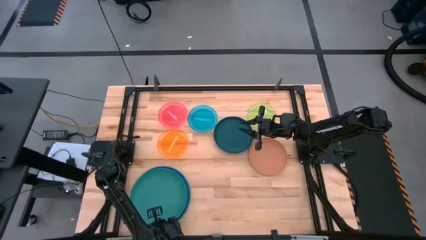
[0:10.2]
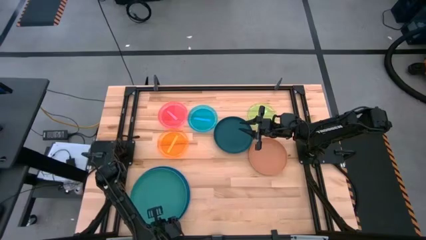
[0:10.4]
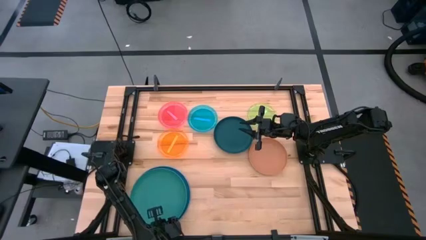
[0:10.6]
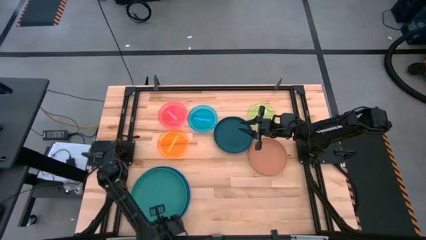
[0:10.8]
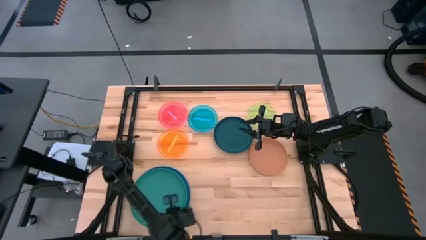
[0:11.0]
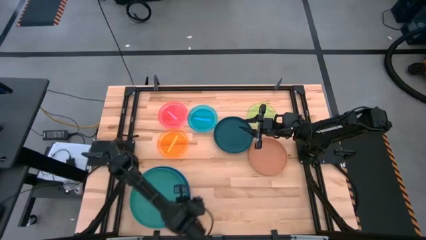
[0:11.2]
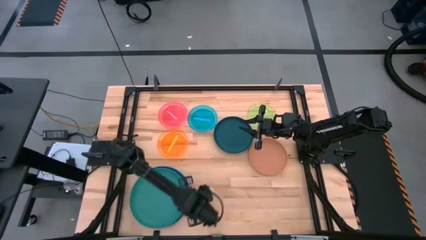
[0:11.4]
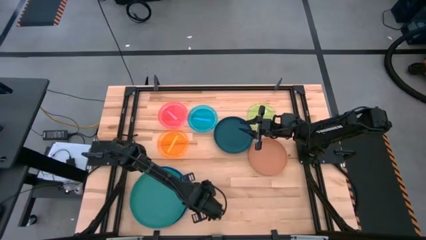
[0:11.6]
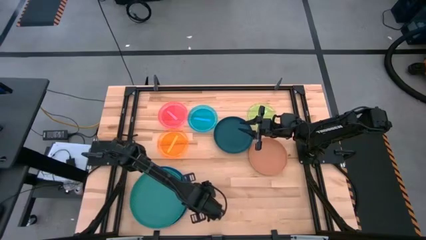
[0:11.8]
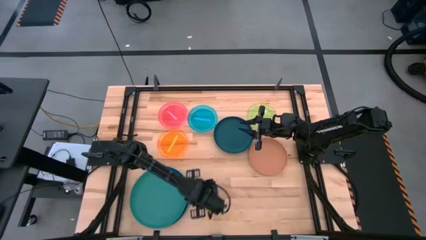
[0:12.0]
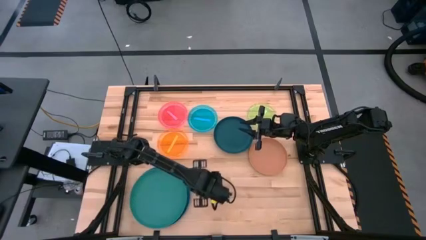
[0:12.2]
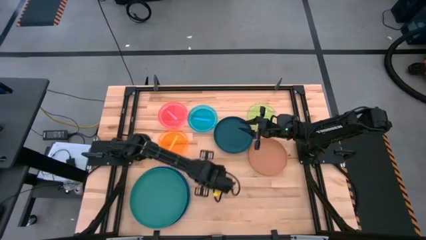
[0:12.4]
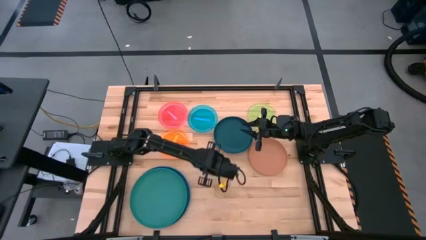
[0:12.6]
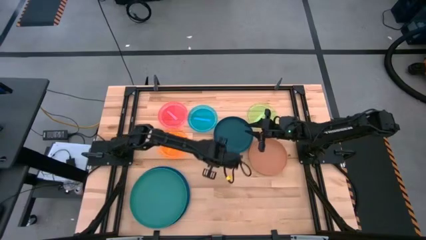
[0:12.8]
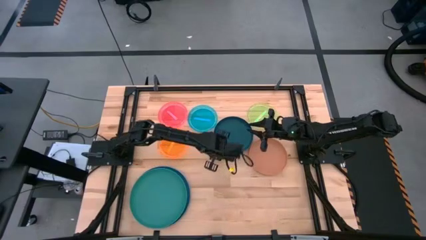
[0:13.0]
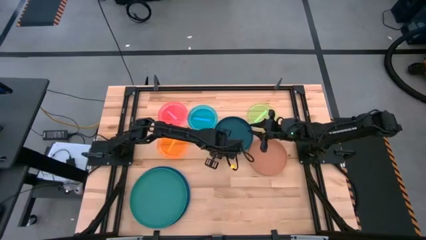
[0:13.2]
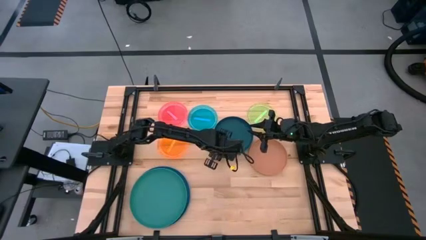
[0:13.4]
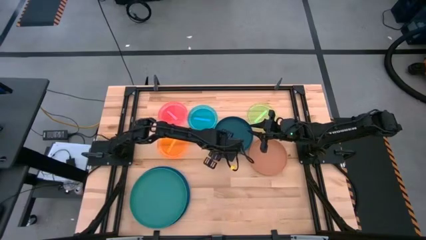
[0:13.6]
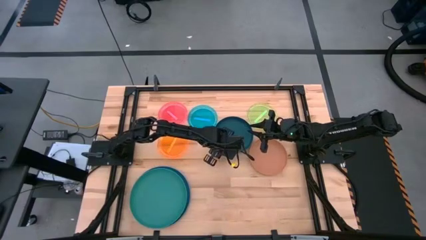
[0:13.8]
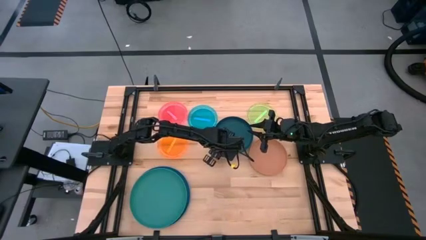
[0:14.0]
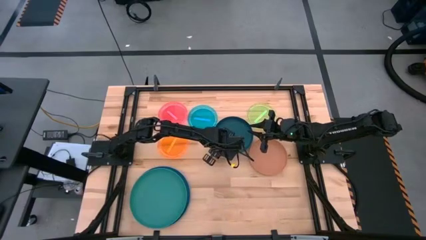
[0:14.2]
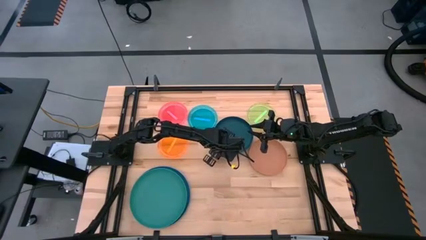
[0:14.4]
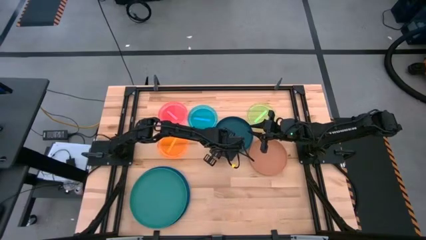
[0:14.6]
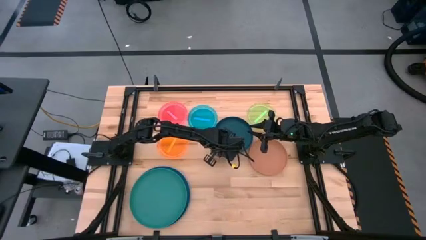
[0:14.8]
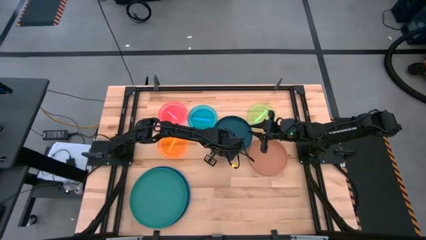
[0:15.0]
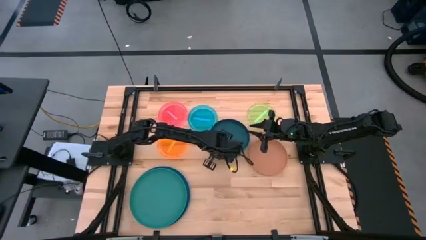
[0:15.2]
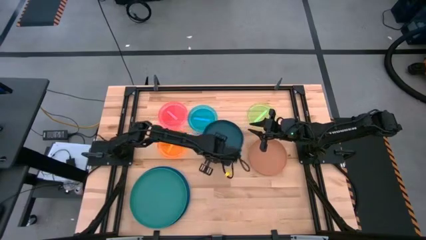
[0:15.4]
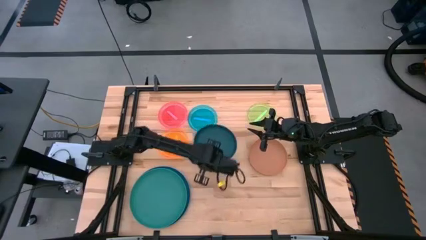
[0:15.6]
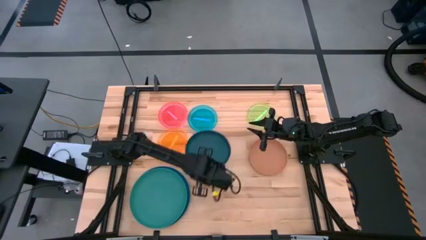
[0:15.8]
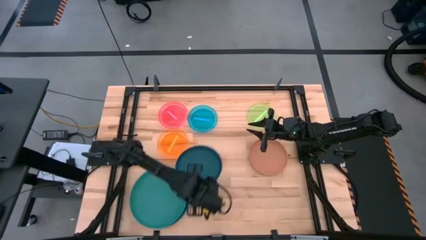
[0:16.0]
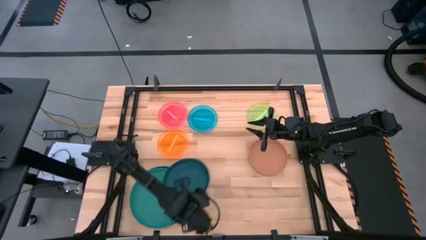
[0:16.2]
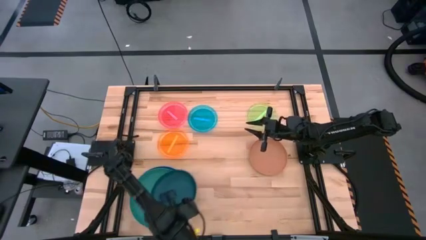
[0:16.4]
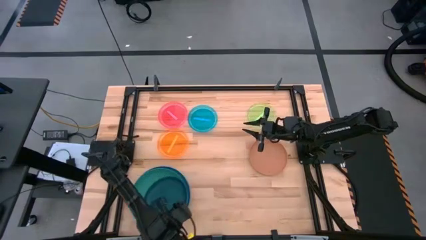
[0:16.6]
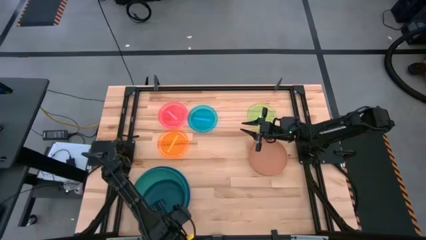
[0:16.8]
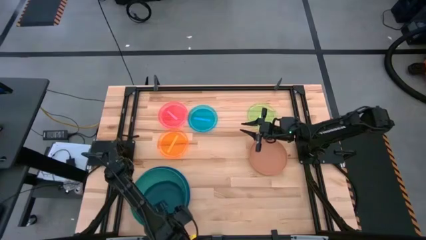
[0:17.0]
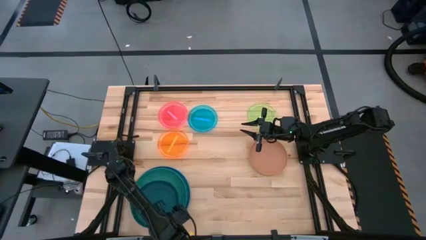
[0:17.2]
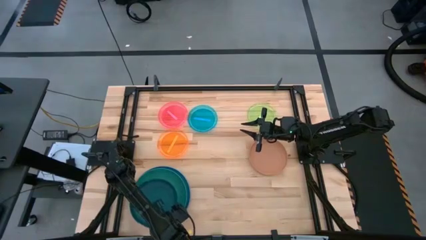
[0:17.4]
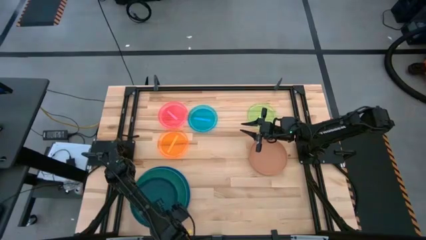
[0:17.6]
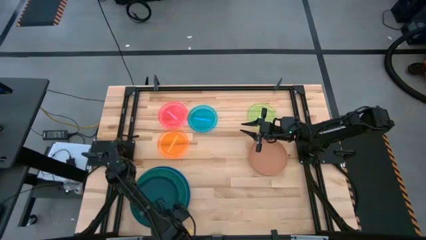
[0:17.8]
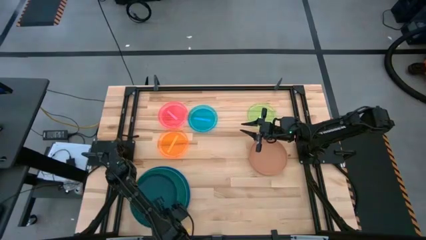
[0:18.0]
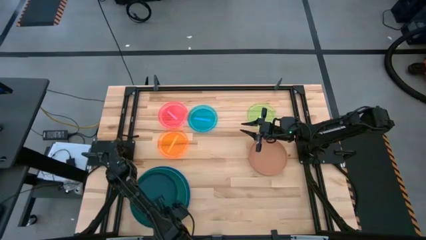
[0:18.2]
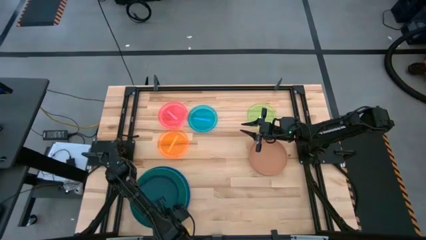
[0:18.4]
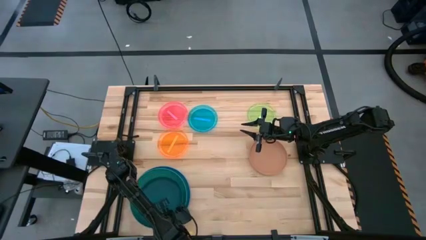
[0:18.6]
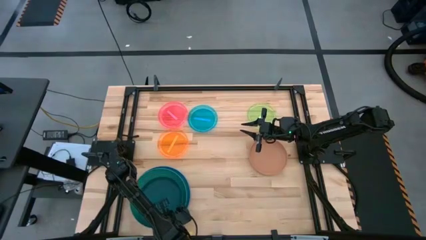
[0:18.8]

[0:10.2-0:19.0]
Task: Stack plastic plates
Stack the dark green plate on top of the green plate

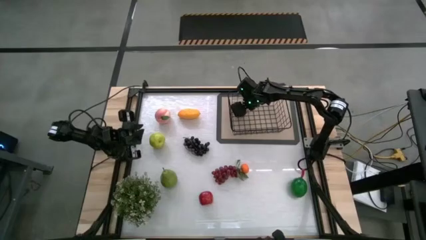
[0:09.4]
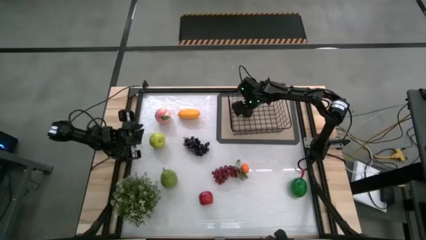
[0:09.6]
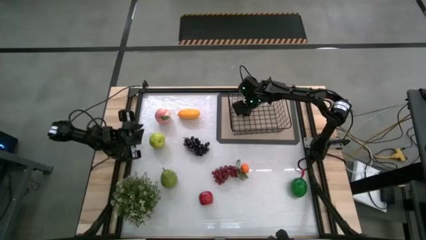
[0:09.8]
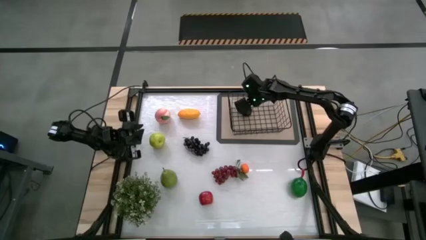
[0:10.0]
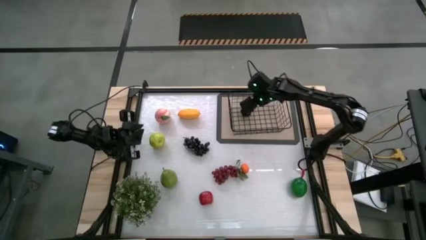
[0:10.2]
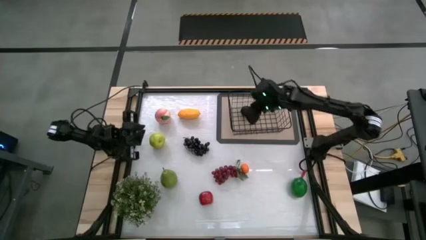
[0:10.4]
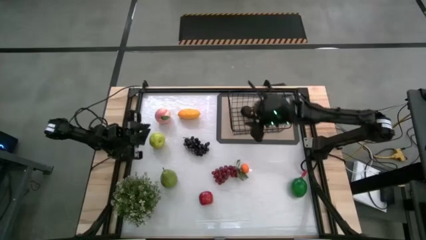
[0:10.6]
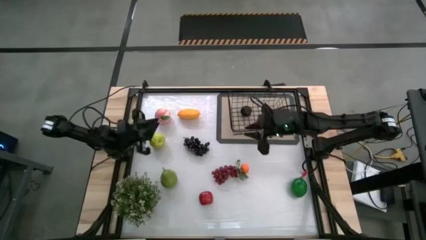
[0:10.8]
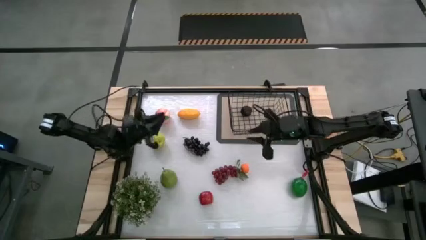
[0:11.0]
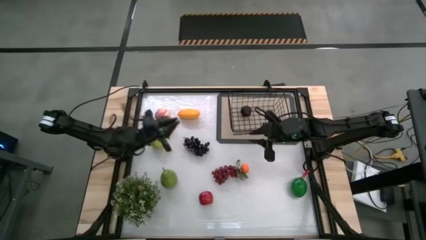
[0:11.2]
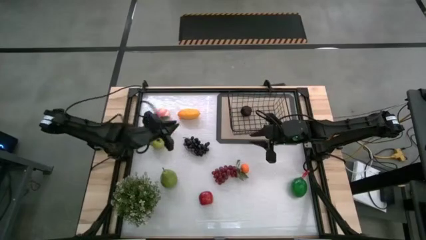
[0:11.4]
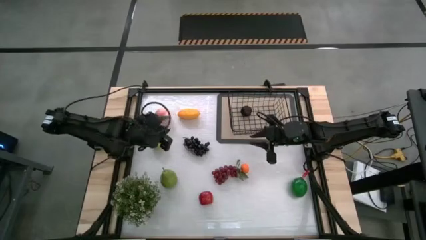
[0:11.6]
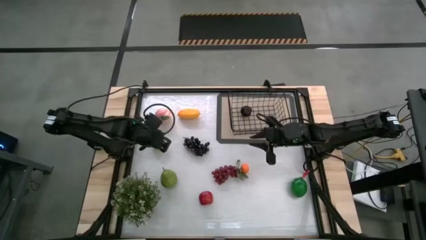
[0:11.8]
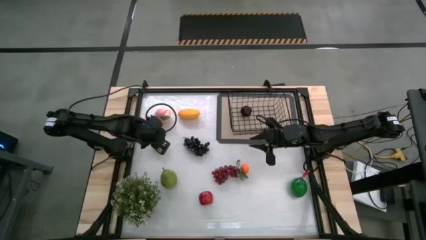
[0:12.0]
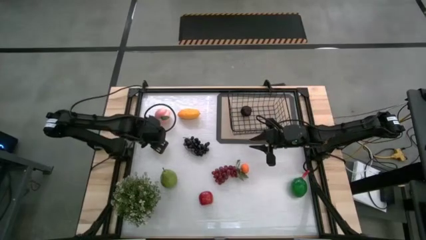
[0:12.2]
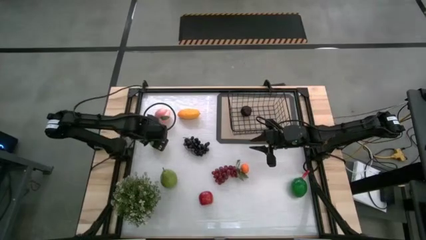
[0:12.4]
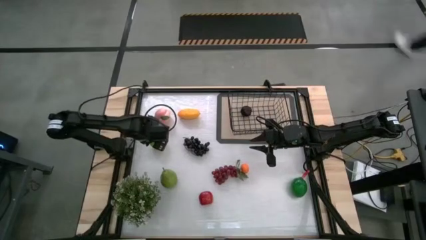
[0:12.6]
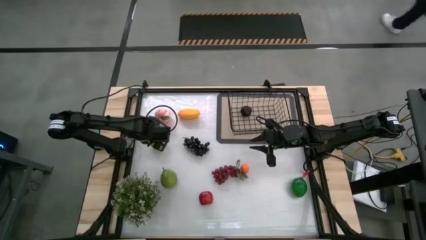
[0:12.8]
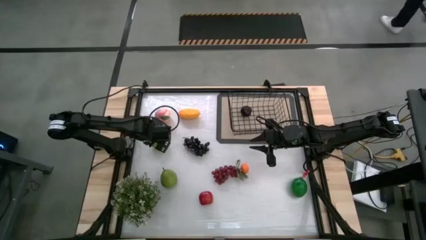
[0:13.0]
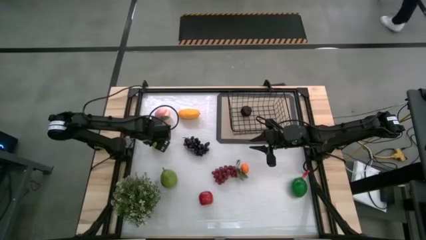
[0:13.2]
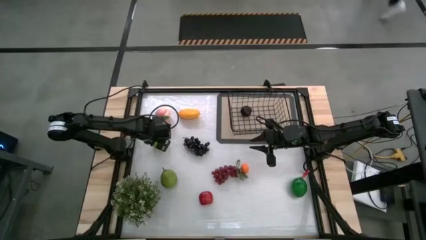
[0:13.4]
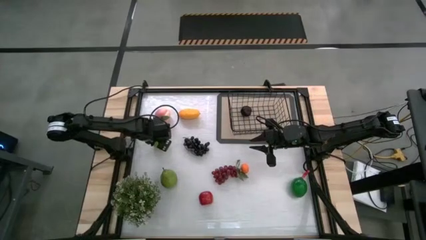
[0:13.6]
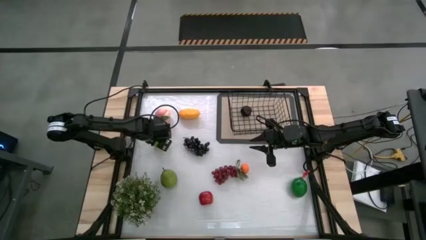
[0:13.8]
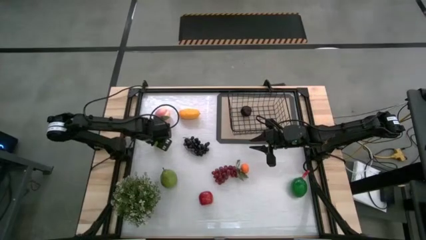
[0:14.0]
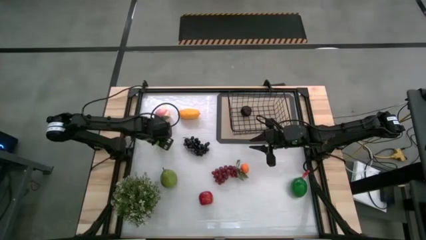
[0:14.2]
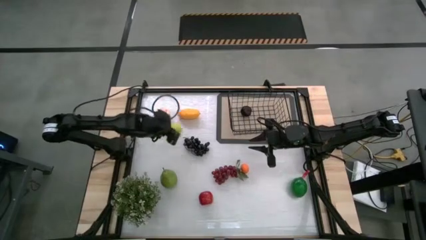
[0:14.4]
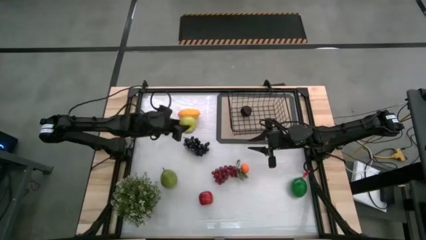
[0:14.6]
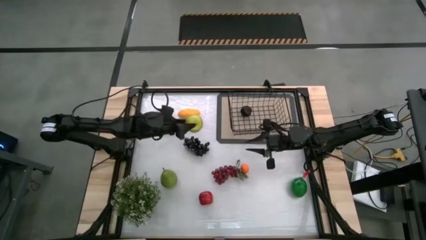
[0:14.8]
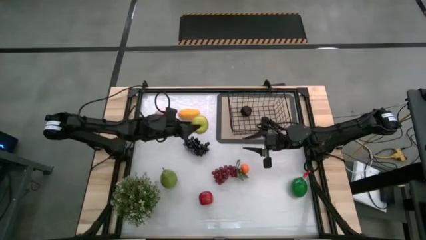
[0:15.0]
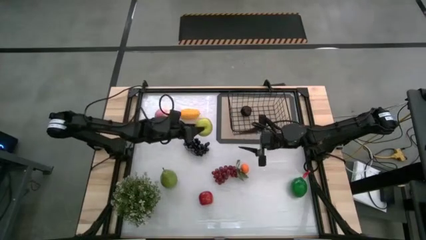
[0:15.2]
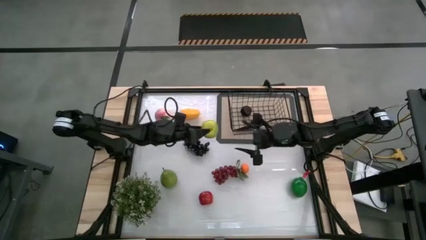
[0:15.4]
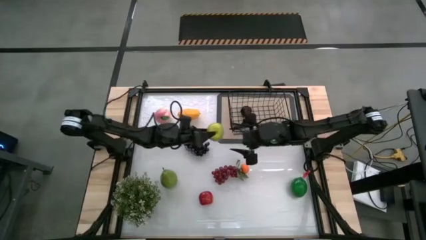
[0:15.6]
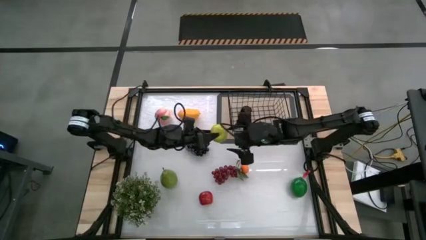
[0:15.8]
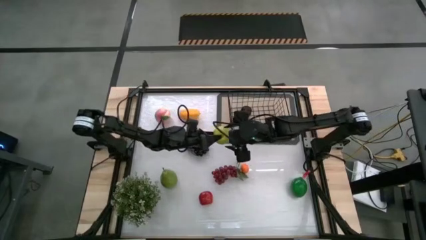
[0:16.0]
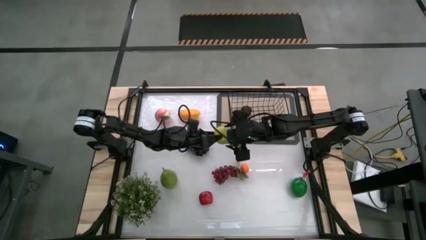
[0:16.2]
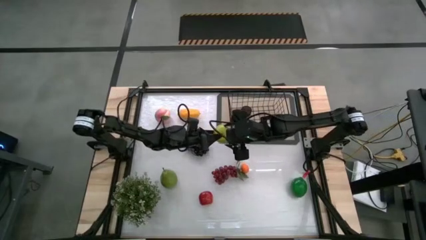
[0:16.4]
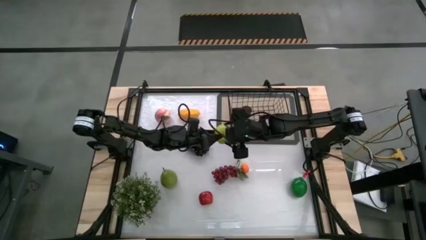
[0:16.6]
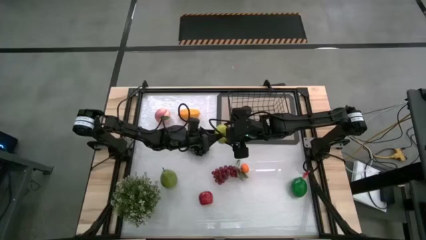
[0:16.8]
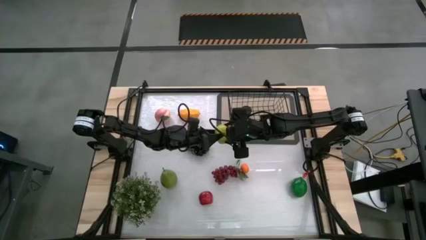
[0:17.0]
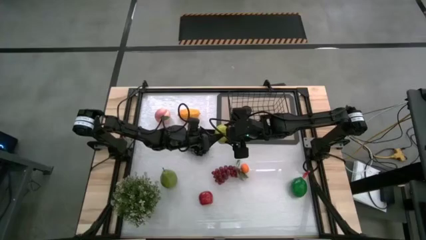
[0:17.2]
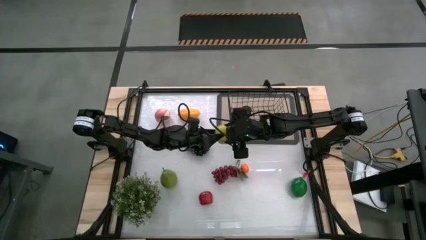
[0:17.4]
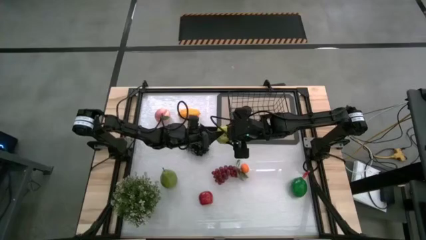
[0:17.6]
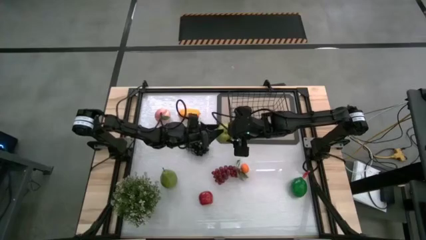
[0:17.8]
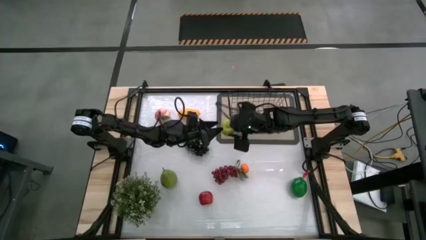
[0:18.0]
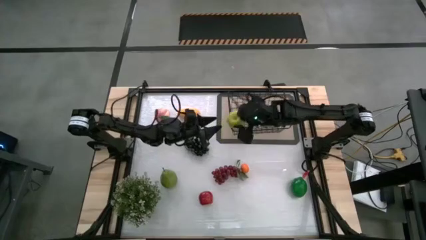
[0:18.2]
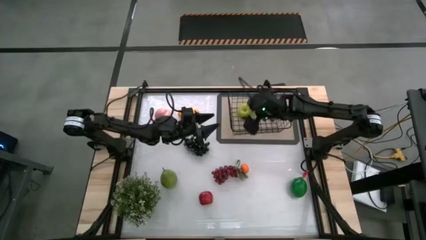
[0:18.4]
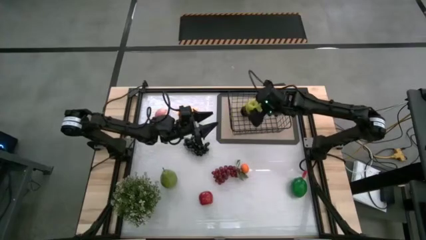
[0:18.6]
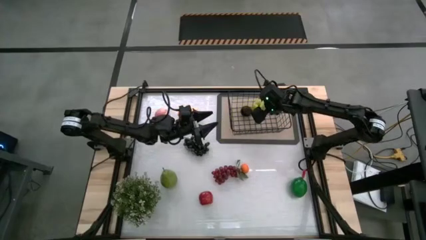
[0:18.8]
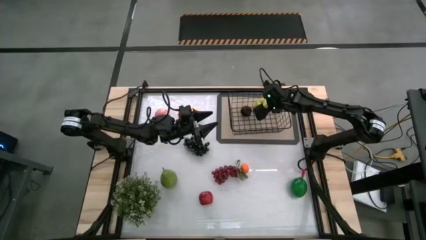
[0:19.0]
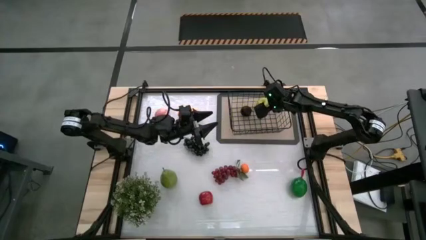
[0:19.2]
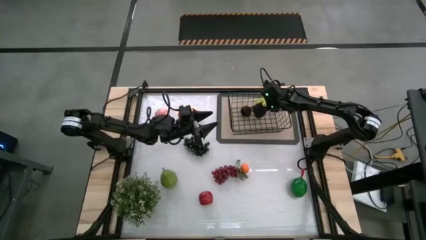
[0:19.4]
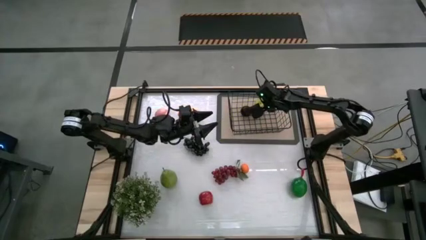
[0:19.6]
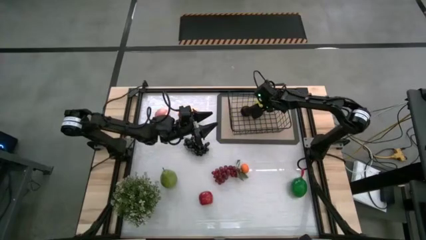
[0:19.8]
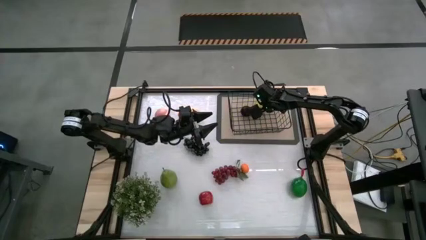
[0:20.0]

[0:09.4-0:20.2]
Task: Build produce basket
Put the green apple into the black basket
